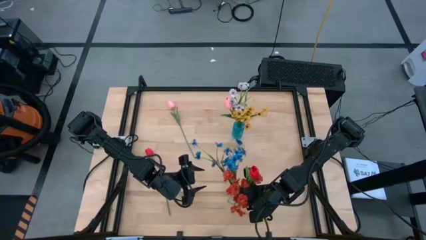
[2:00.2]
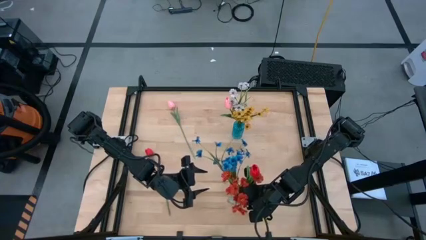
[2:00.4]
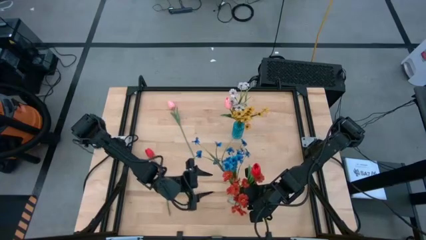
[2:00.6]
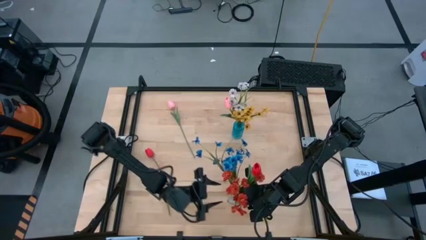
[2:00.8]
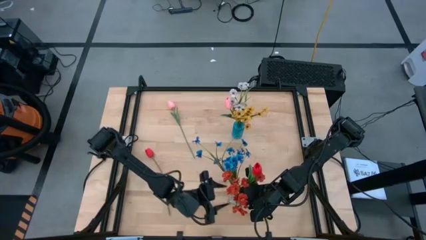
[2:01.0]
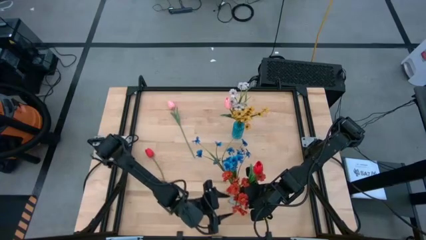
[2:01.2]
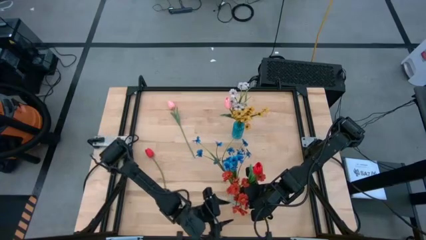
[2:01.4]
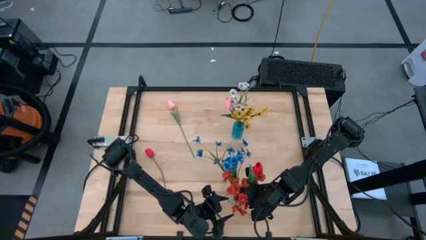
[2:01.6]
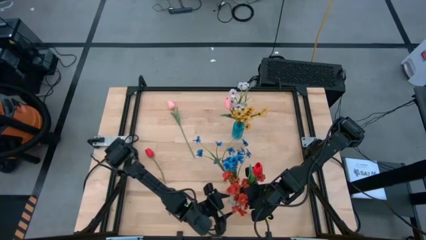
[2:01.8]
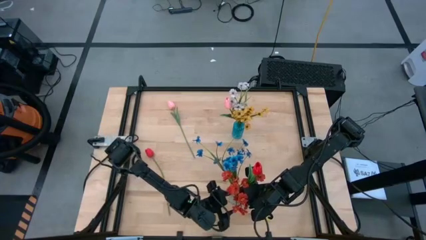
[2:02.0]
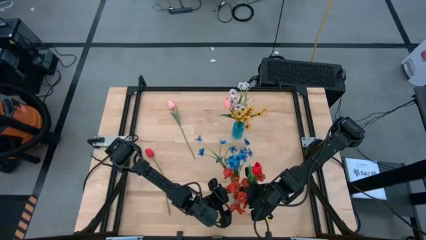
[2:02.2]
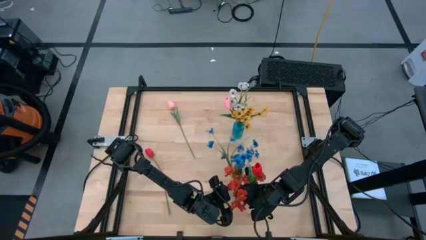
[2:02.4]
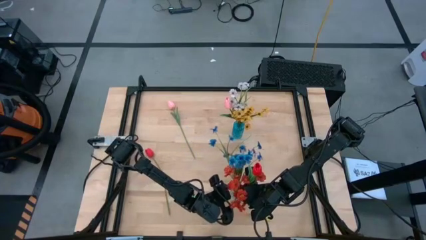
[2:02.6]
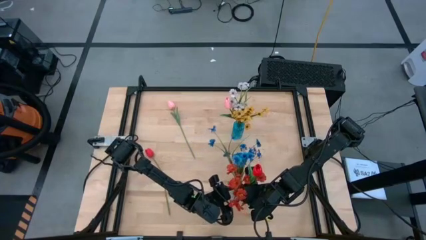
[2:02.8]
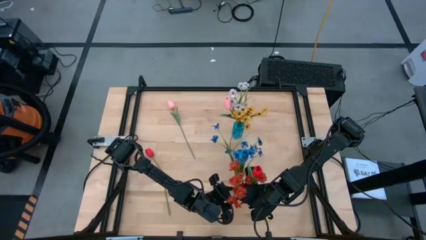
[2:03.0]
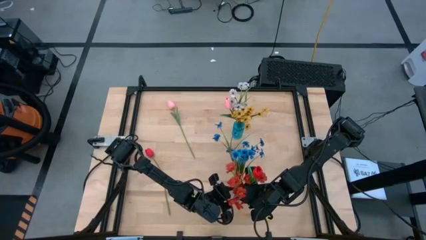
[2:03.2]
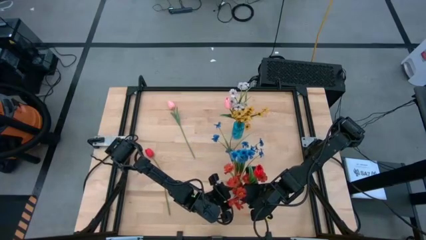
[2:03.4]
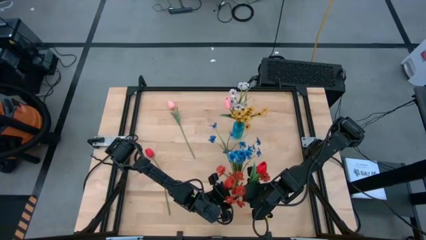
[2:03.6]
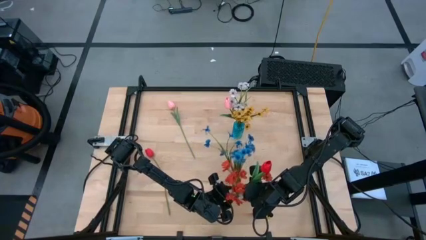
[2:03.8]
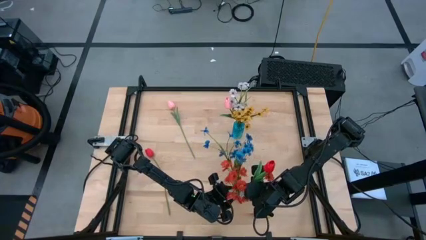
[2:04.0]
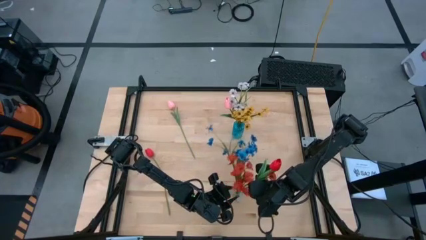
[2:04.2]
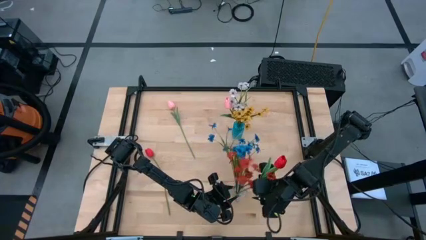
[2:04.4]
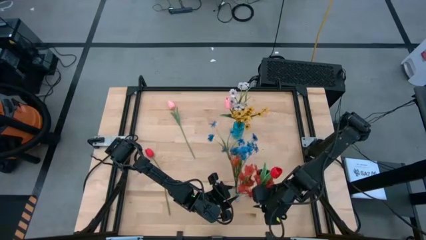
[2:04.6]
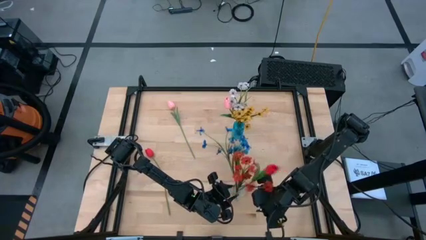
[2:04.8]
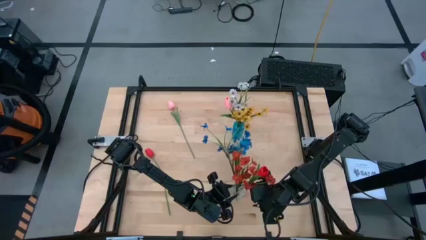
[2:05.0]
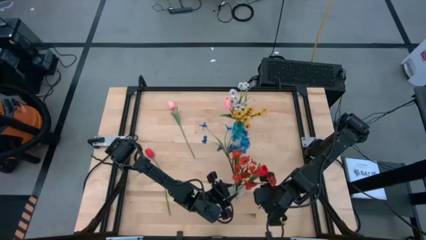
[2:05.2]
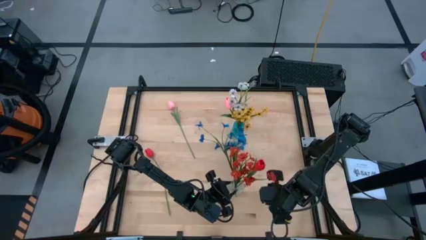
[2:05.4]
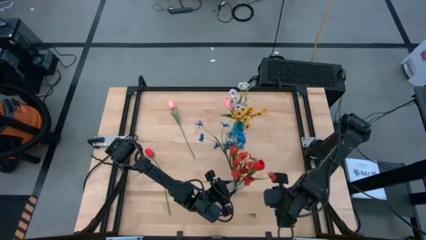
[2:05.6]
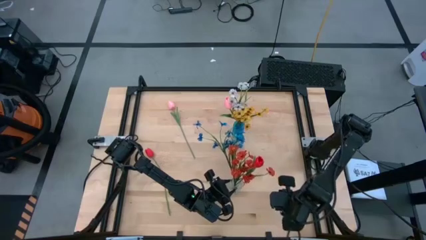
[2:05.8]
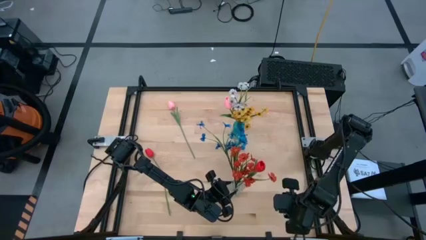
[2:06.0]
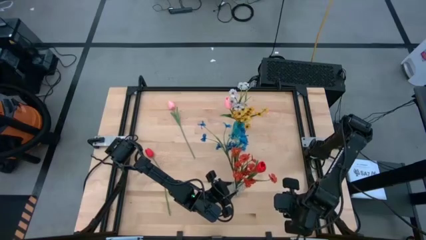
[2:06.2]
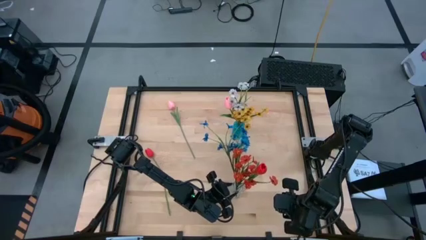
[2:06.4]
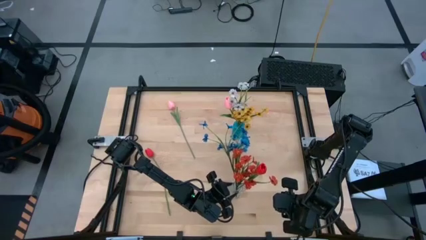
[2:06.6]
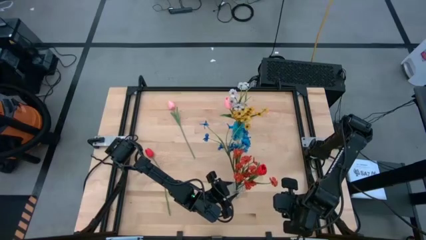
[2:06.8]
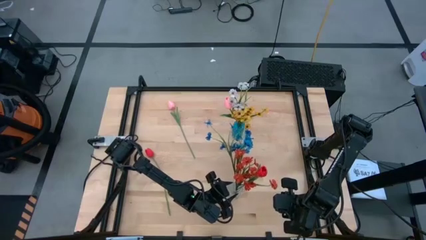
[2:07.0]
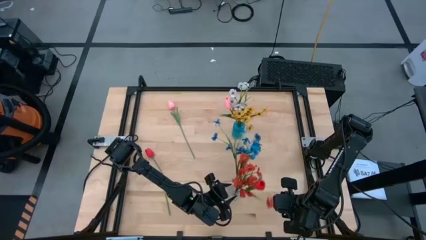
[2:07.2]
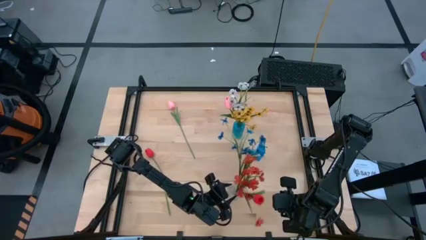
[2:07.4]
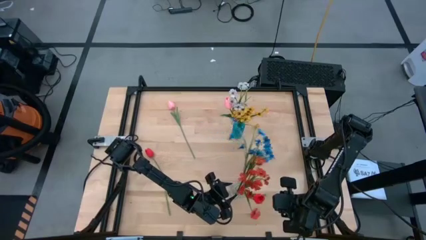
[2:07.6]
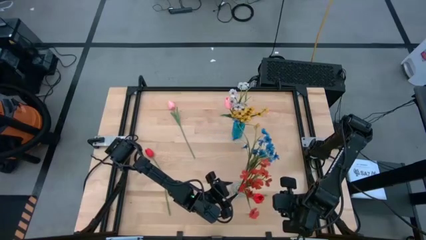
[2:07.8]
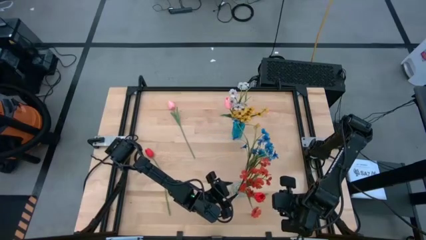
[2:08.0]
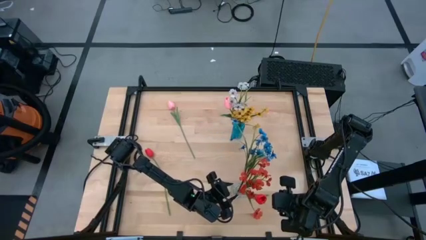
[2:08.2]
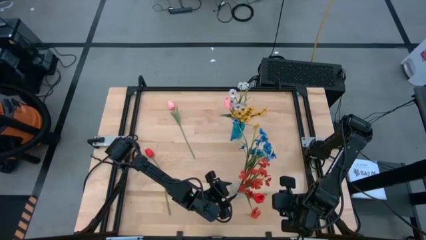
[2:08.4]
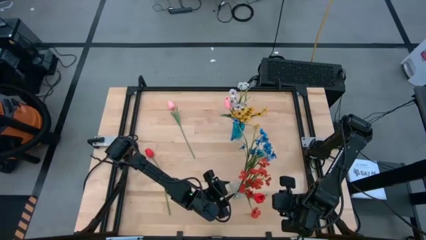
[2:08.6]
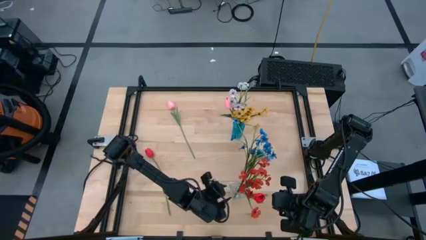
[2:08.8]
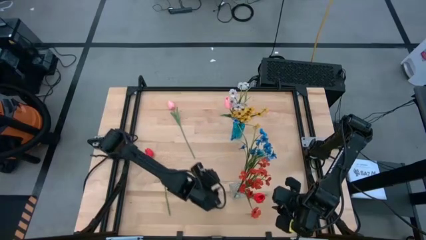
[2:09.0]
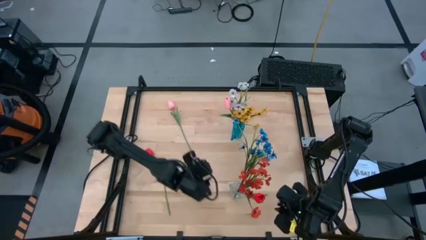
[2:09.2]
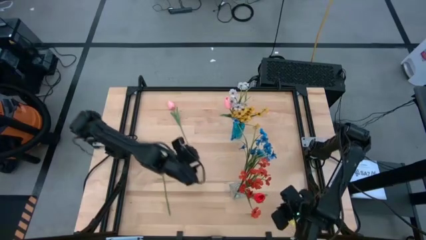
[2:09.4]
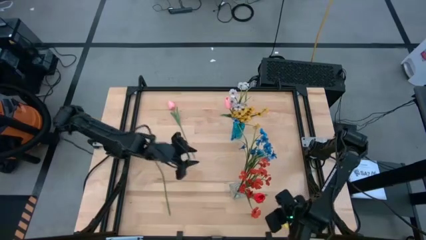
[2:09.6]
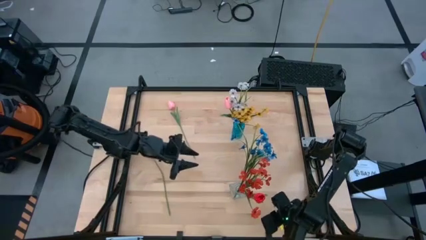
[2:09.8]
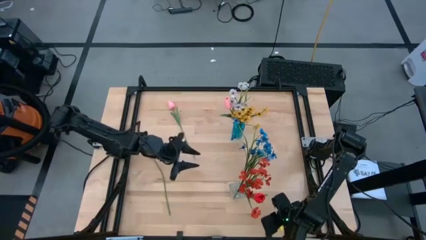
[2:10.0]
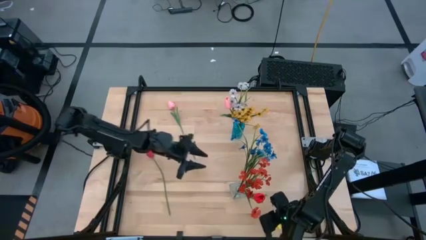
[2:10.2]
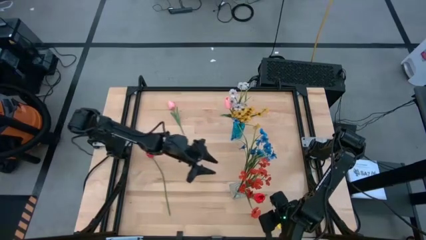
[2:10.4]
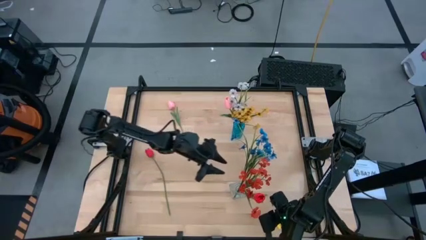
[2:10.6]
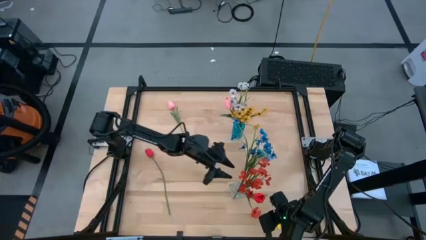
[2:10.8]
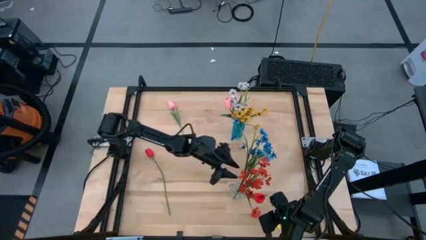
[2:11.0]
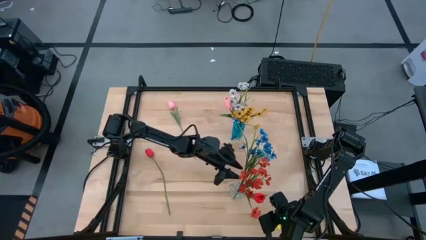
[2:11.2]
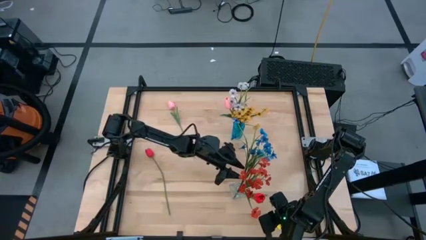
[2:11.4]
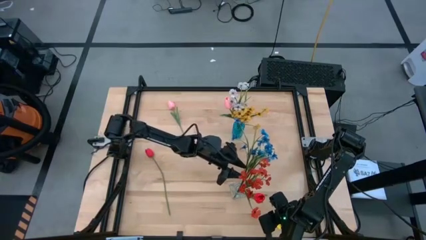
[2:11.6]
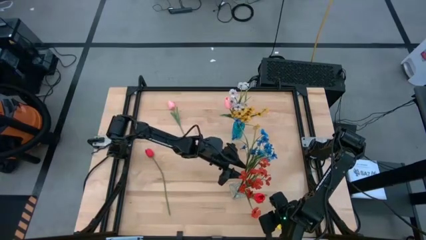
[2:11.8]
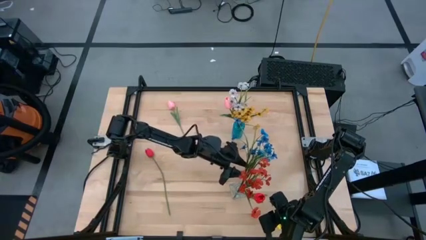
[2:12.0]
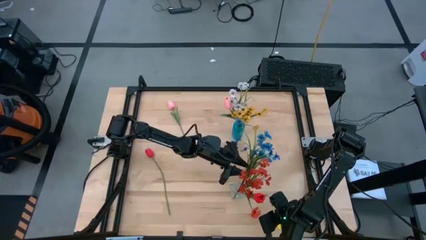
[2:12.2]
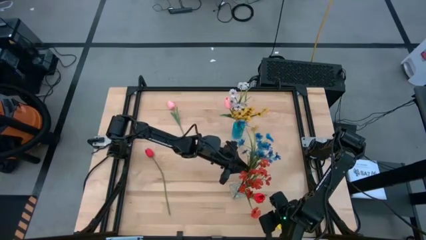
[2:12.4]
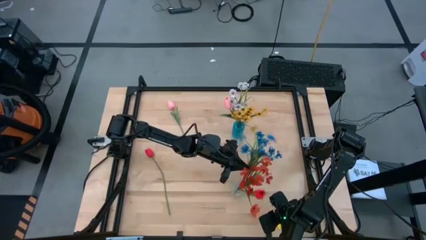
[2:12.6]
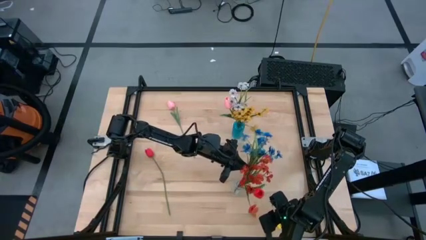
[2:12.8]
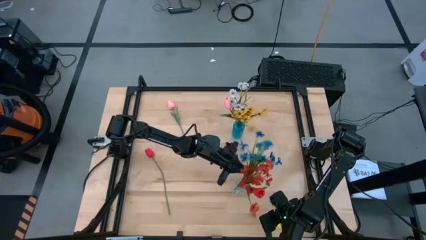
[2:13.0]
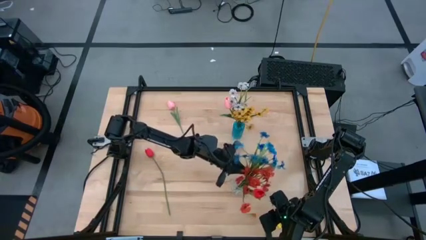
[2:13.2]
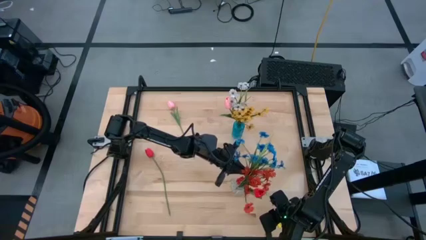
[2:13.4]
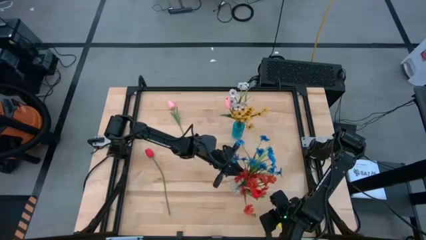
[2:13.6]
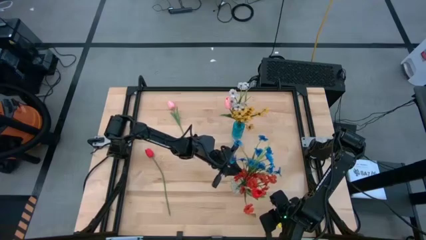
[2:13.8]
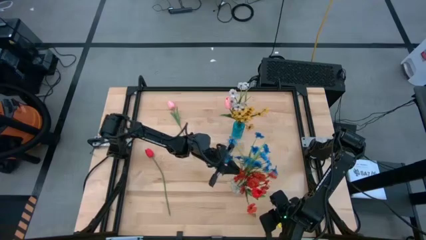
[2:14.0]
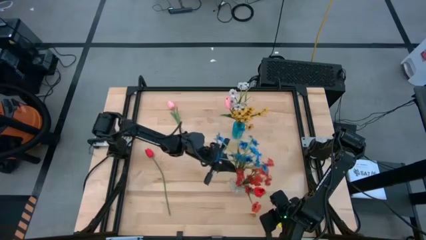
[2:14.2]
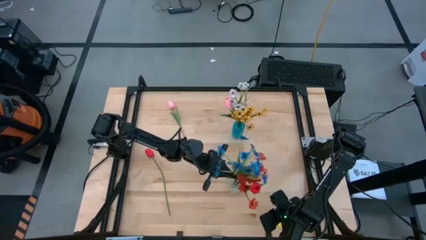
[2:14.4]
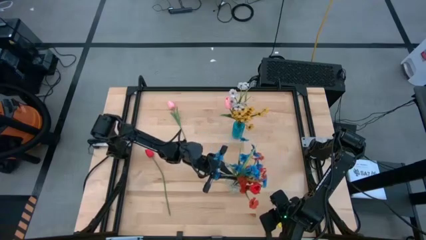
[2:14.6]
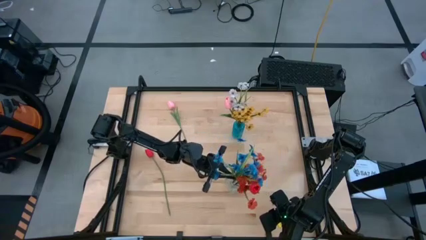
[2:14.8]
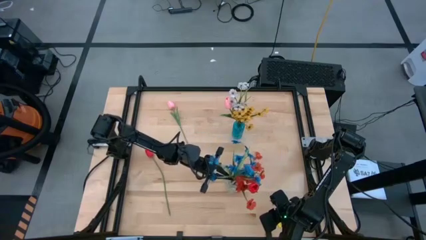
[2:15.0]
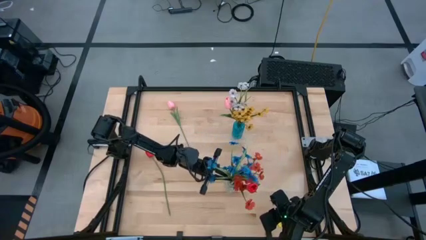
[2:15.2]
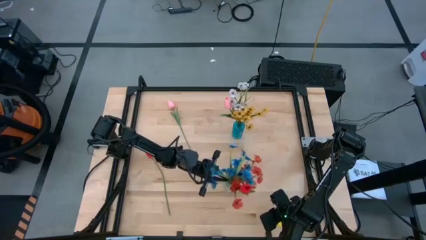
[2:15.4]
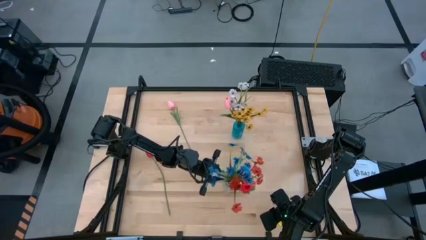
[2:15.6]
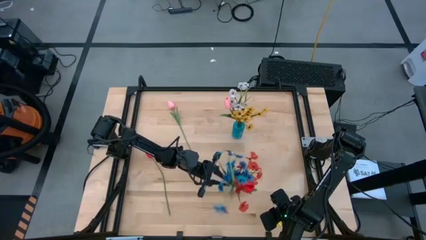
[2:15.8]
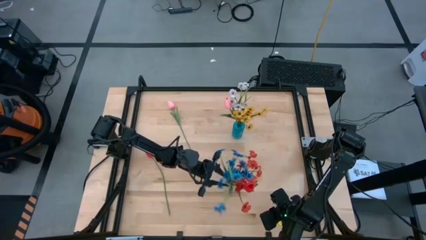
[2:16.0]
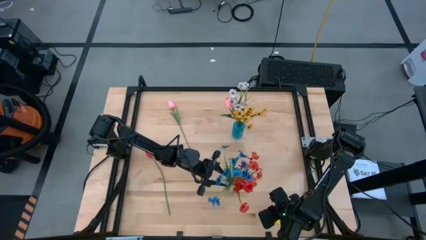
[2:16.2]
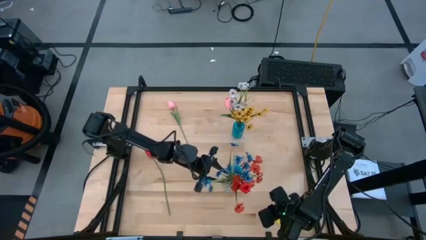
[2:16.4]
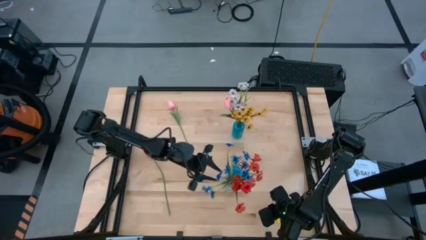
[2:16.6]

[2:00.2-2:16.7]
Task: Sort flowers into vase by color
Adjust the transparent vase
